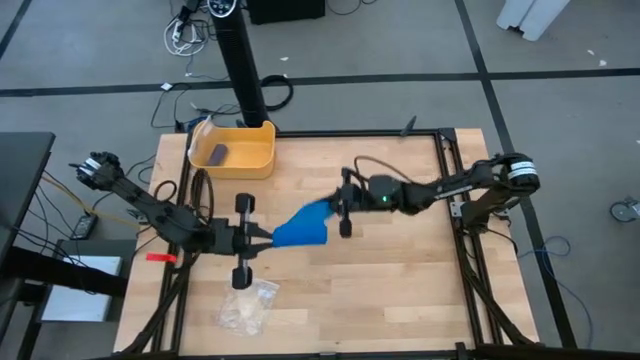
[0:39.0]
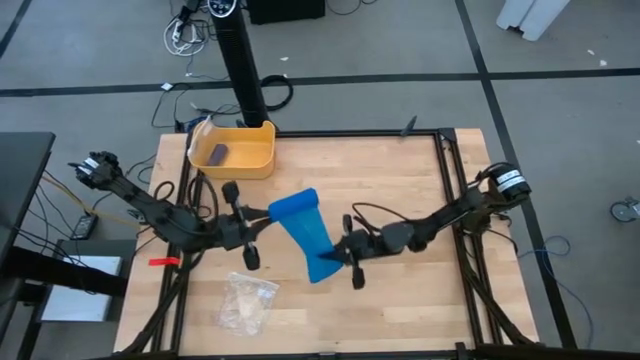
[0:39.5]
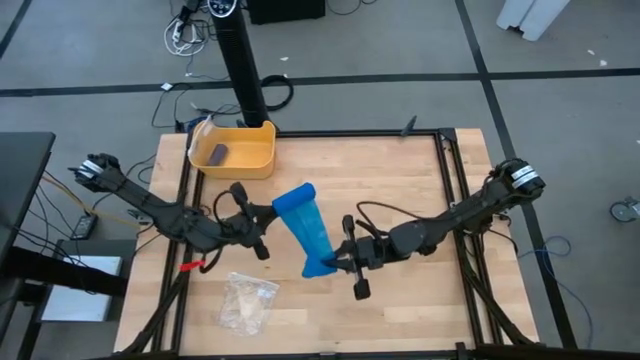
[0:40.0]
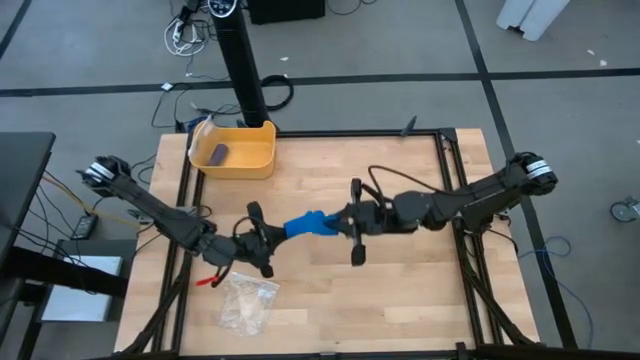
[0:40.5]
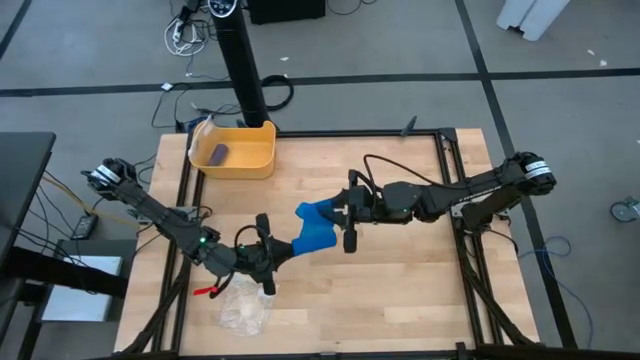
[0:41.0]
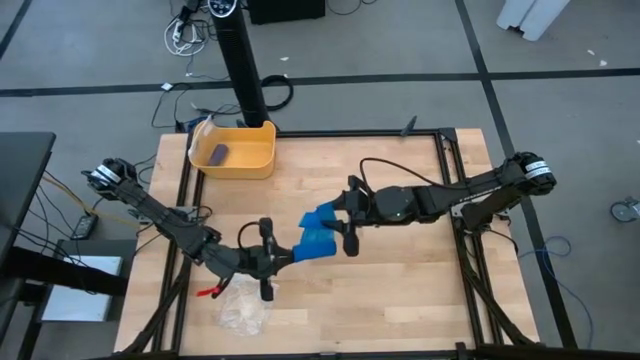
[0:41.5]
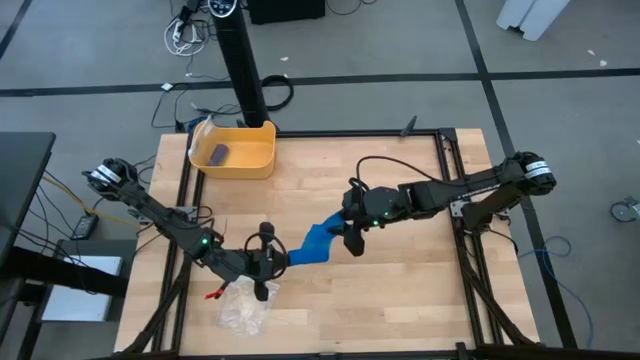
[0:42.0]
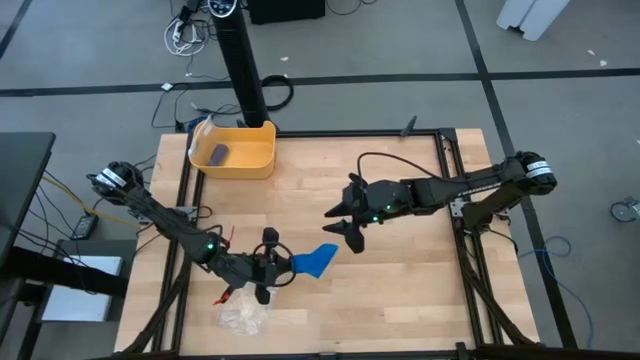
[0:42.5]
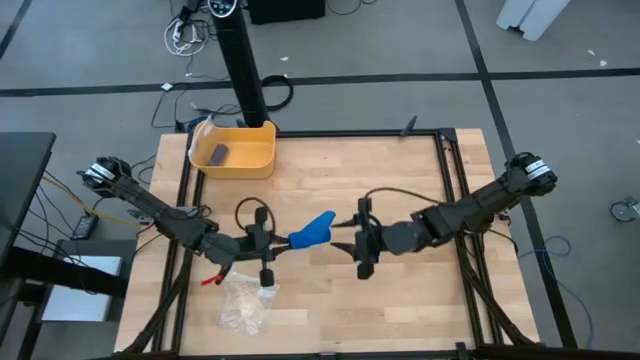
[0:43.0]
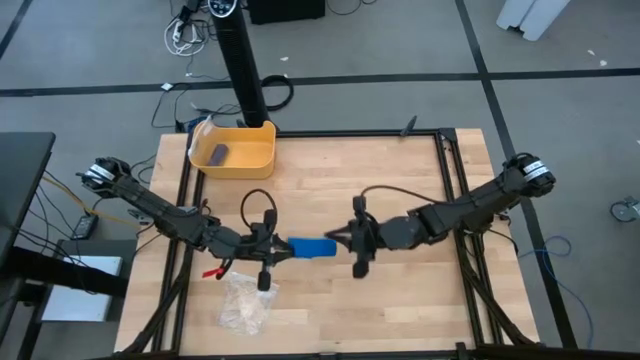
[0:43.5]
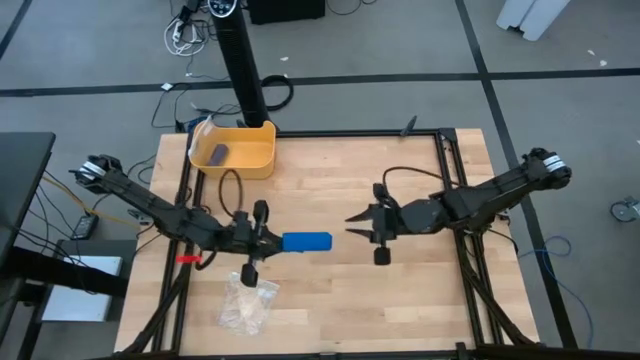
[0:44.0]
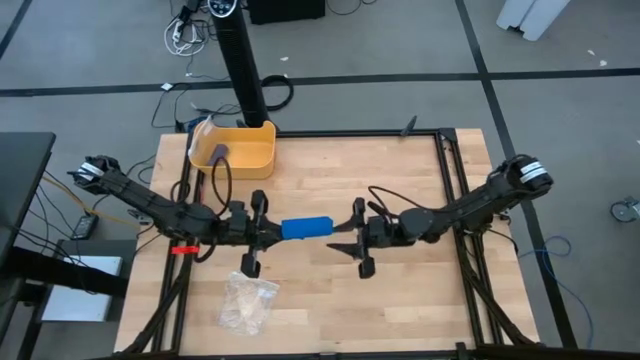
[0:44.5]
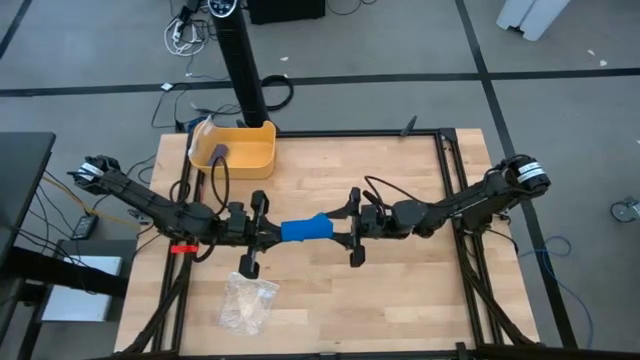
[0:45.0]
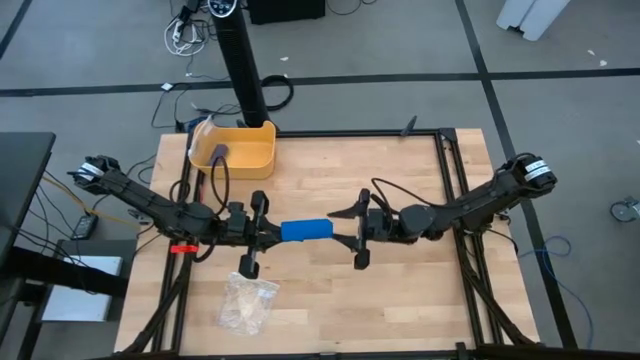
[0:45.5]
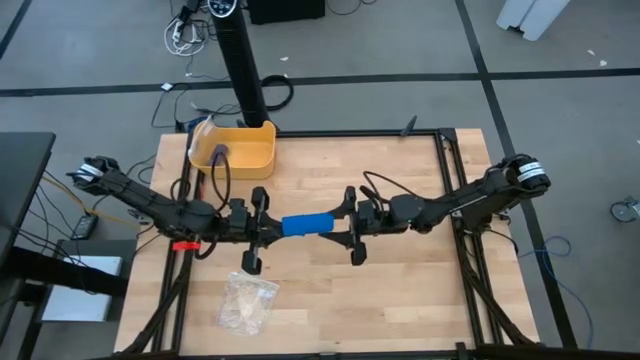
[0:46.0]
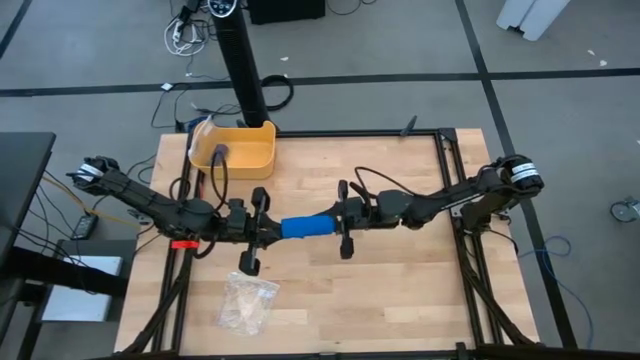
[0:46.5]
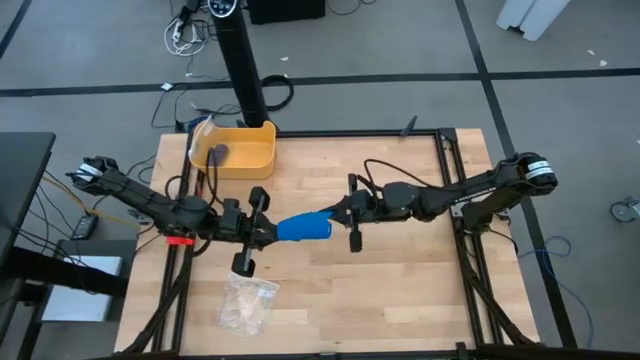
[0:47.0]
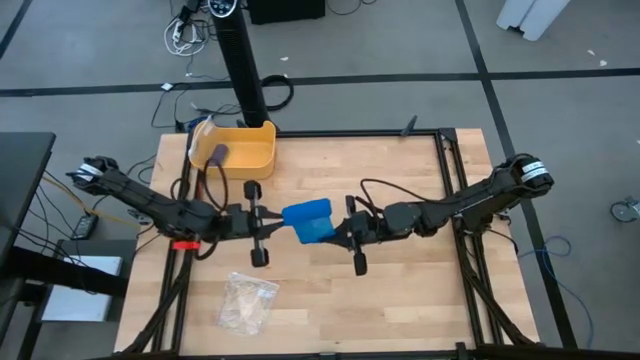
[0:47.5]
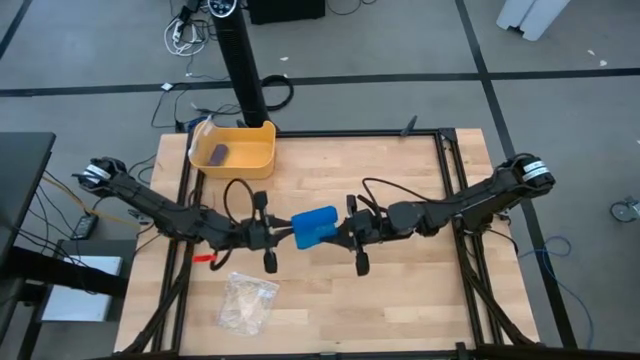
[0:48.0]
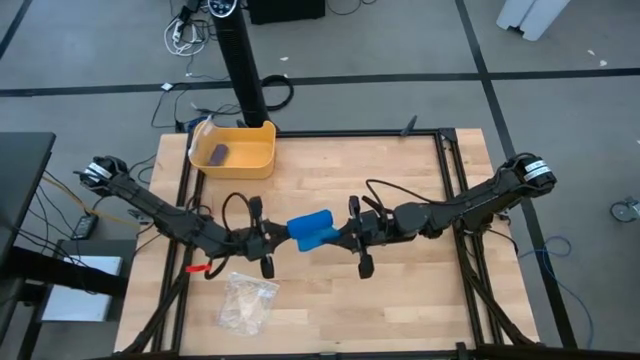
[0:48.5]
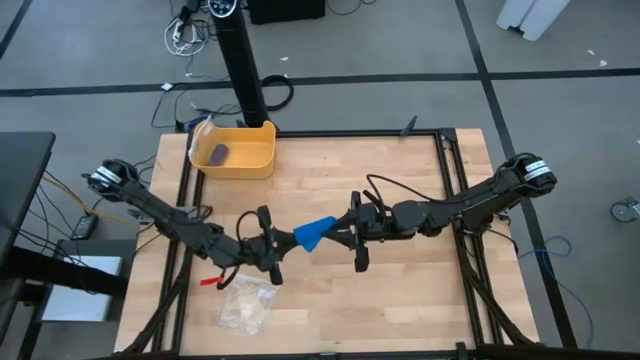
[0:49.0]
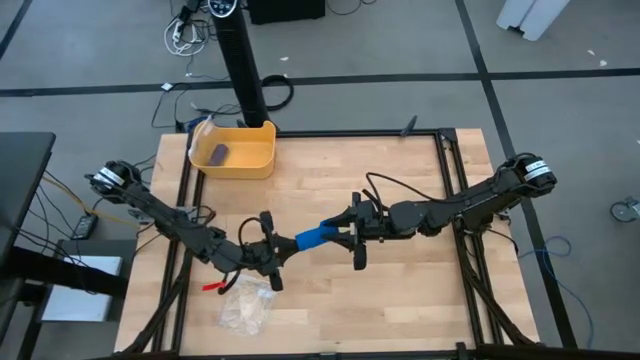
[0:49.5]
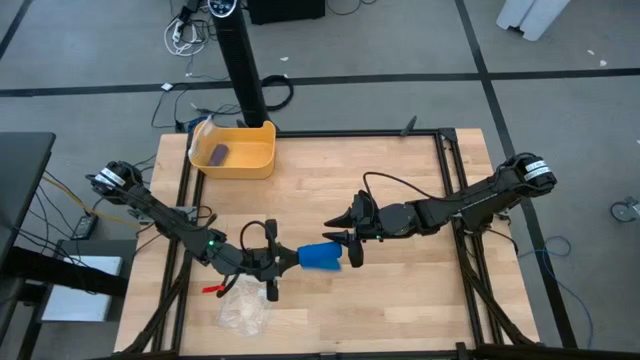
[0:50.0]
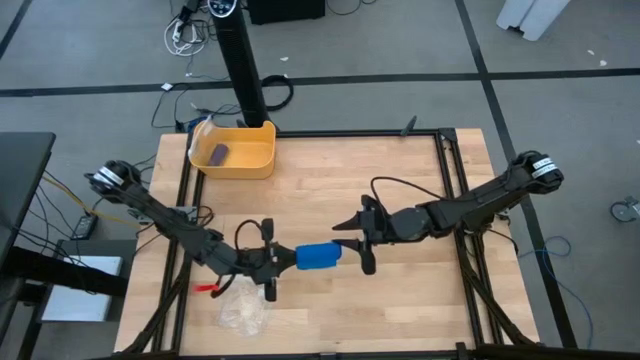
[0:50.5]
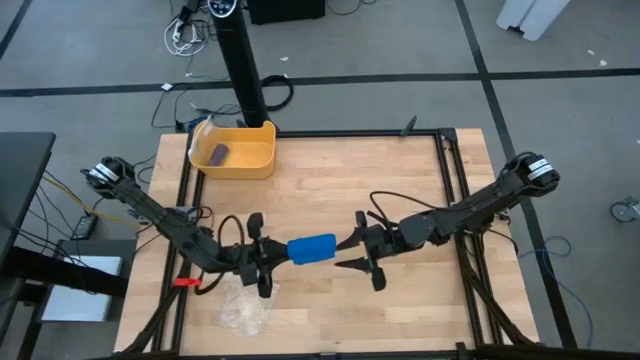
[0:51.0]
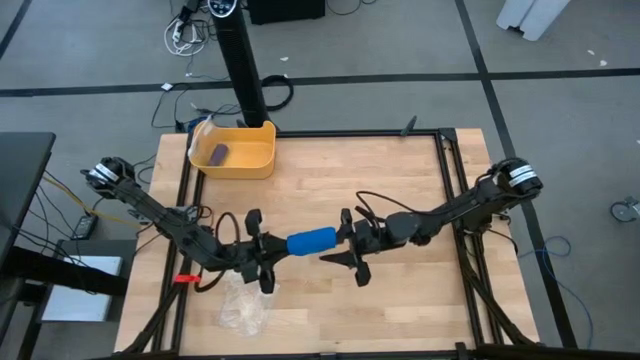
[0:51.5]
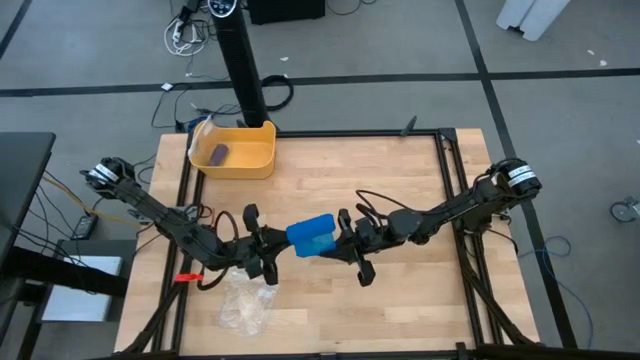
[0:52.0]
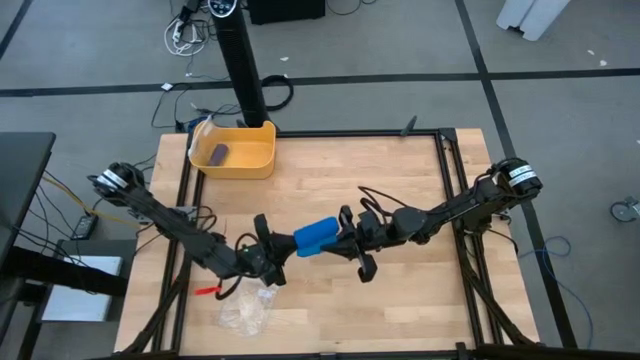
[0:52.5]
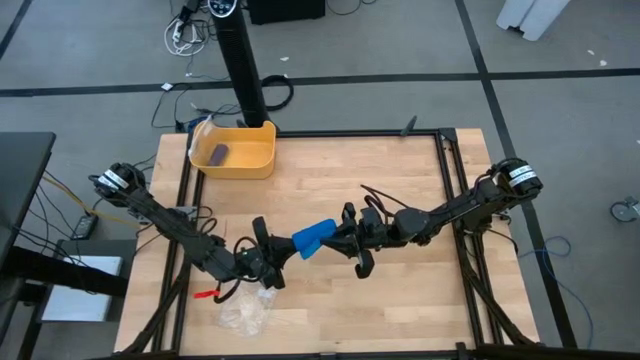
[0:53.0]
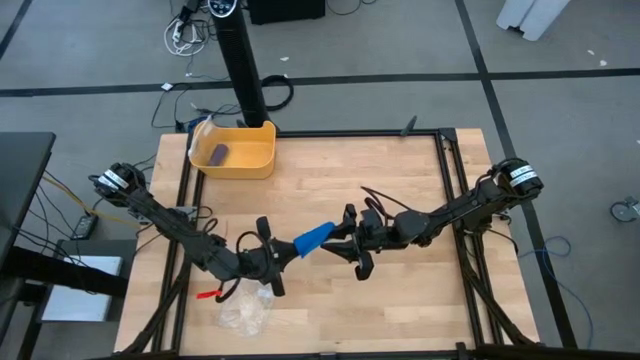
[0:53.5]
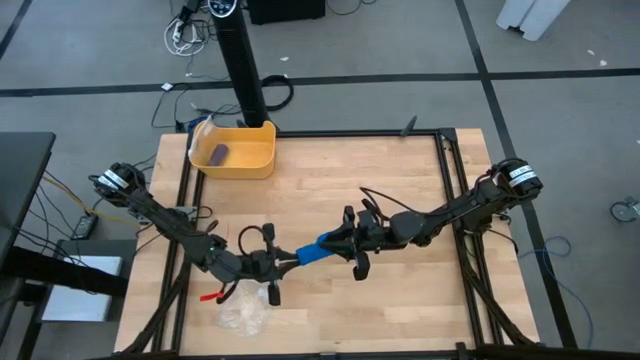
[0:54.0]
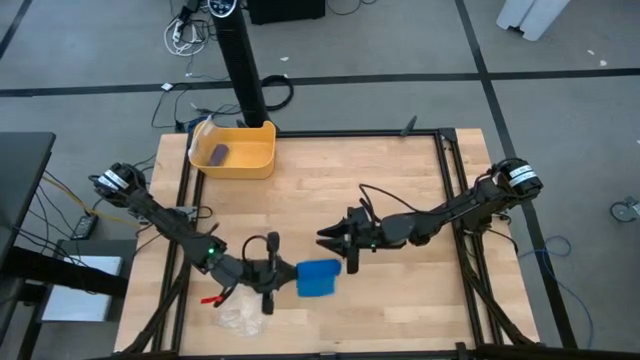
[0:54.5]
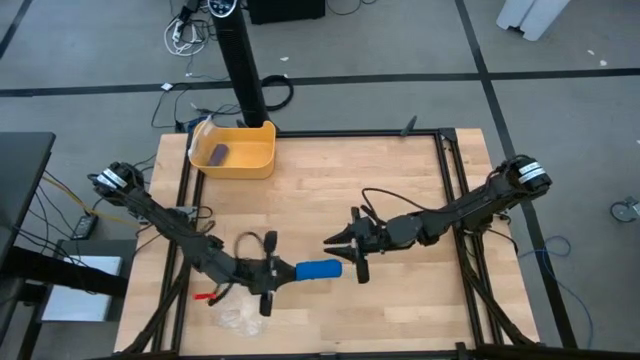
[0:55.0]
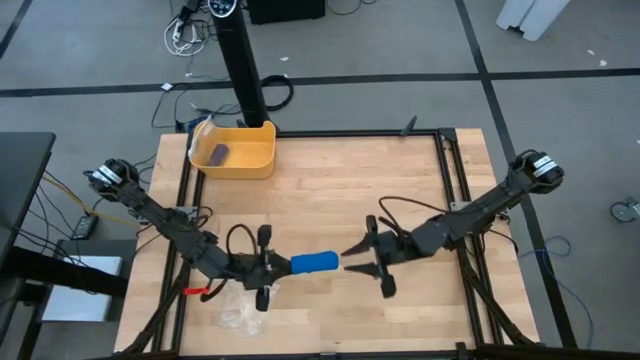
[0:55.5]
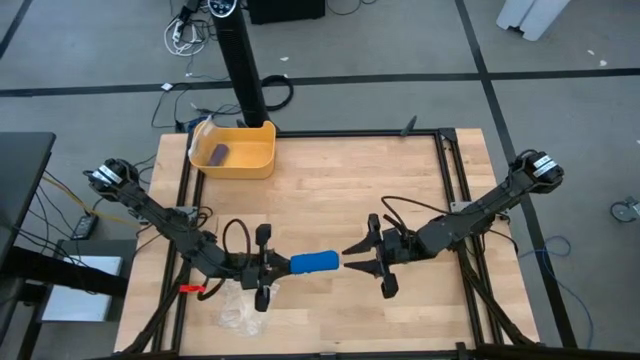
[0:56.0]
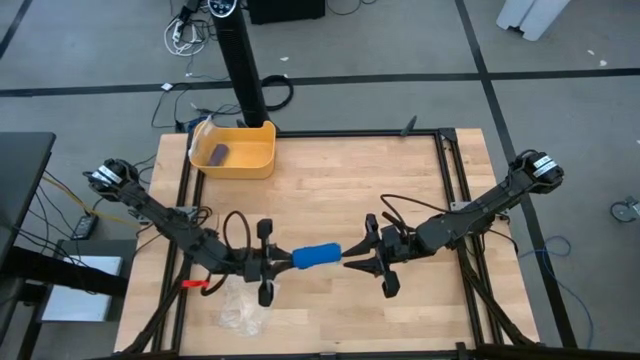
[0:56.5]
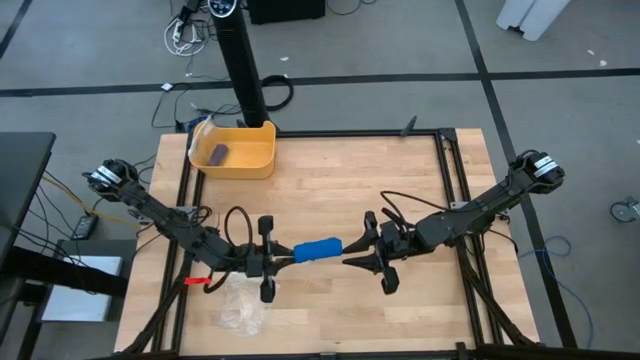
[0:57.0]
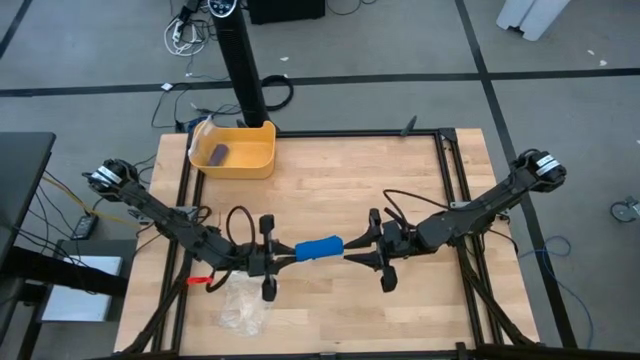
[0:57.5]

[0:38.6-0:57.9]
Task: Roll bandage
Roll the blue bandage

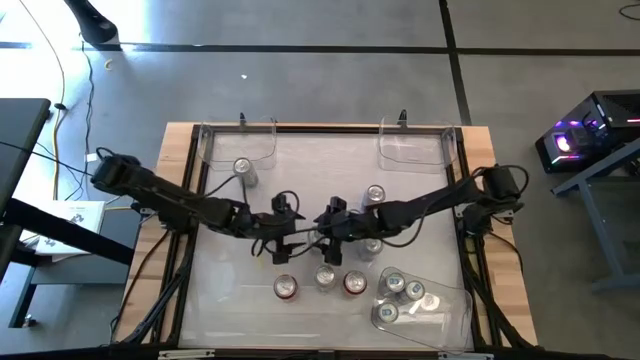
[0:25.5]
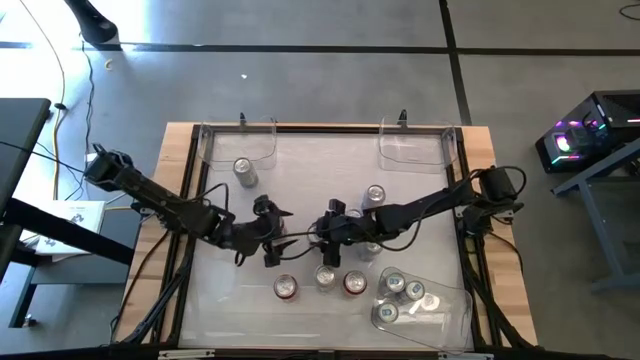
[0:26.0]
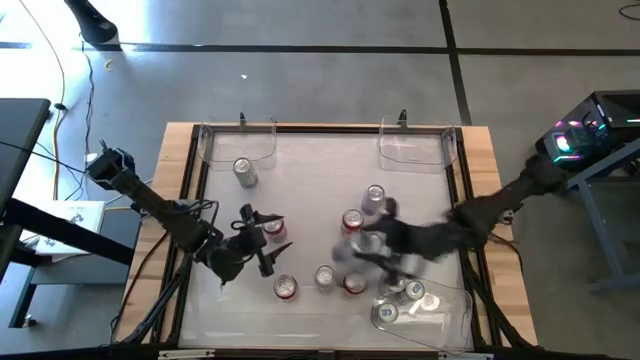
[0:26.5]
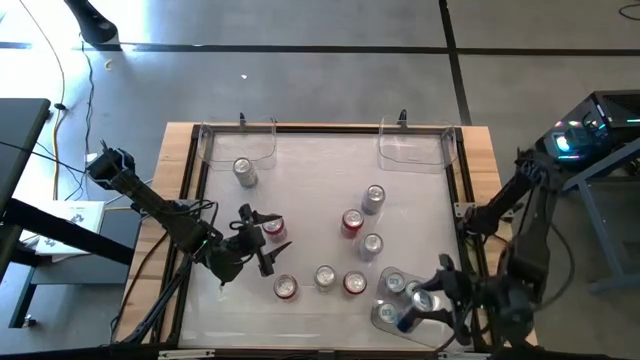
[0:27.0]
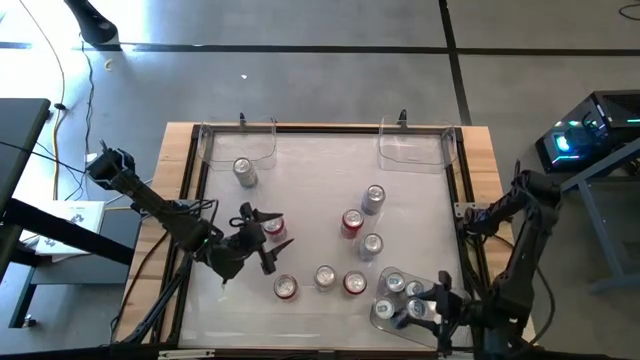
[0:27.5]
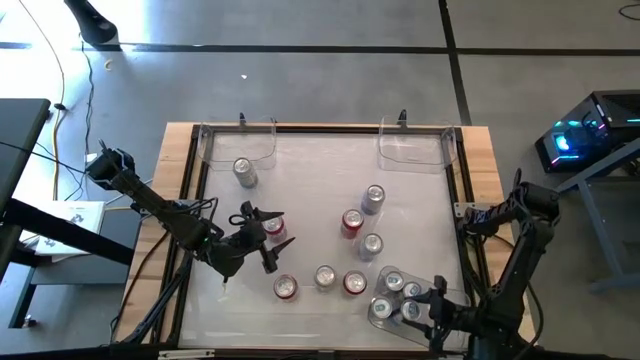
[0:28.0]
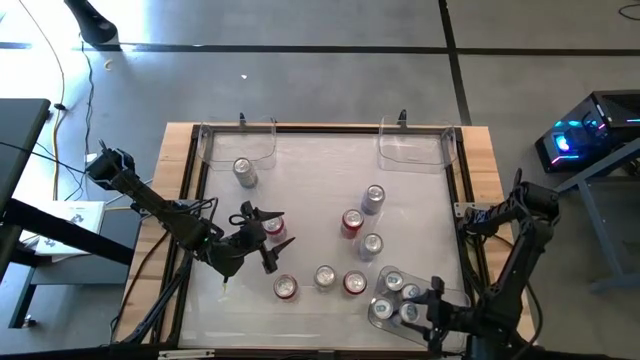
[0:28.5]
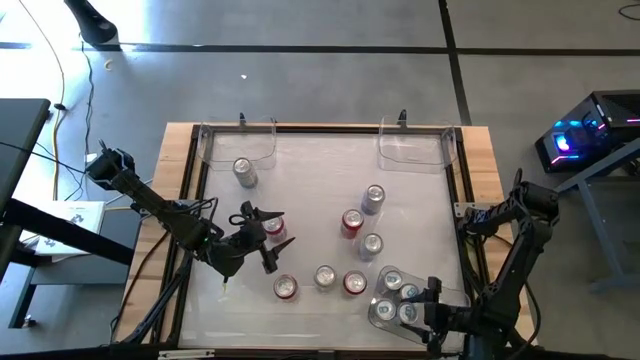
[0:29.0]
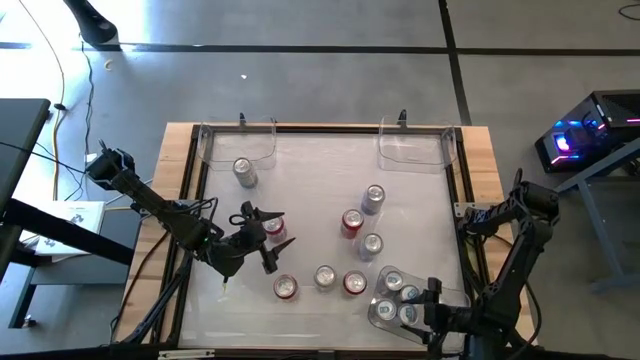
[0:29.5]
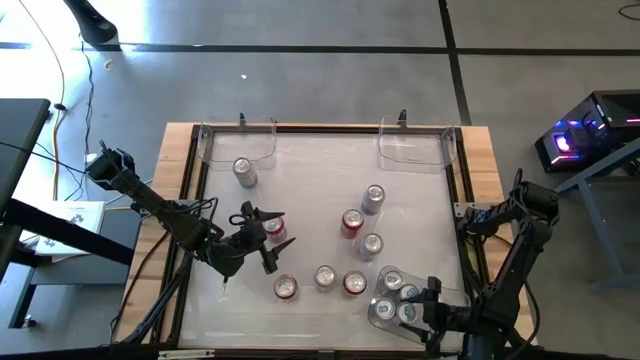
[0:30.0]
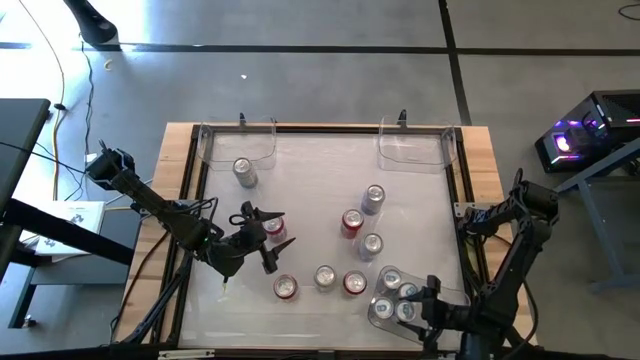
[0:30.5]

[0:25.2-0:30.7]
Task: Sort soda cans
Put the blue soda can into the bottom transparent bin
